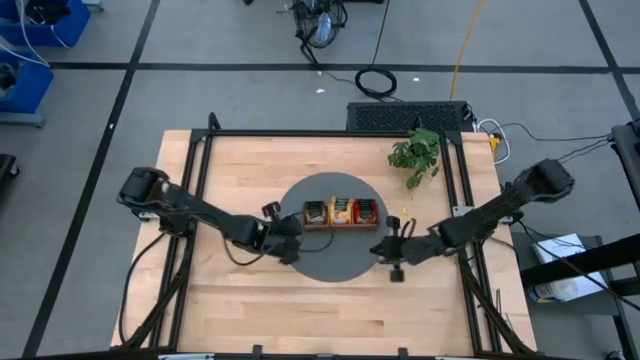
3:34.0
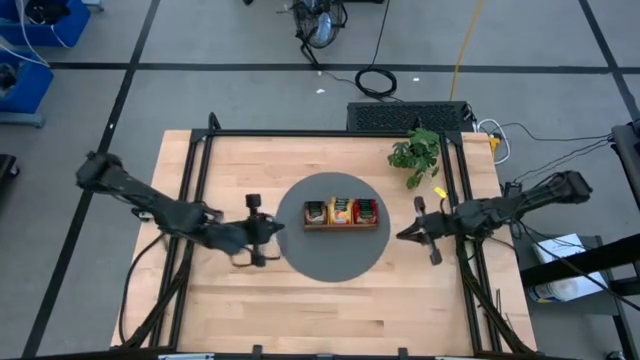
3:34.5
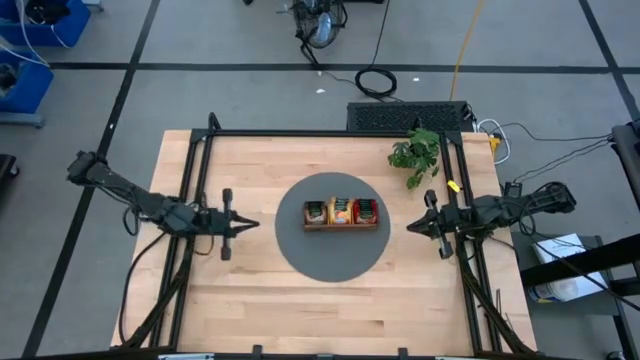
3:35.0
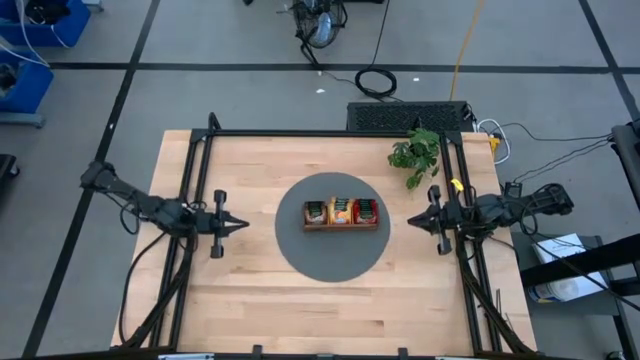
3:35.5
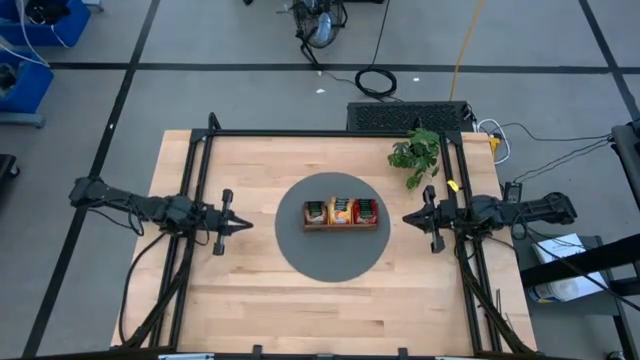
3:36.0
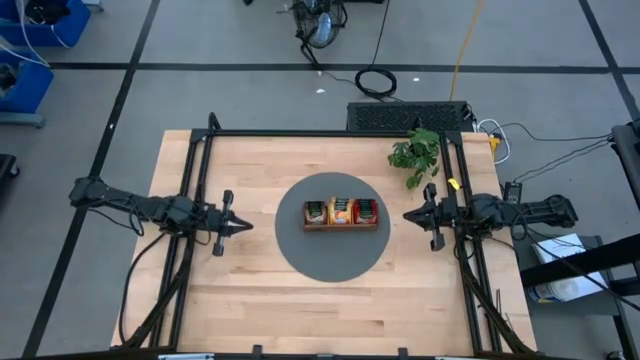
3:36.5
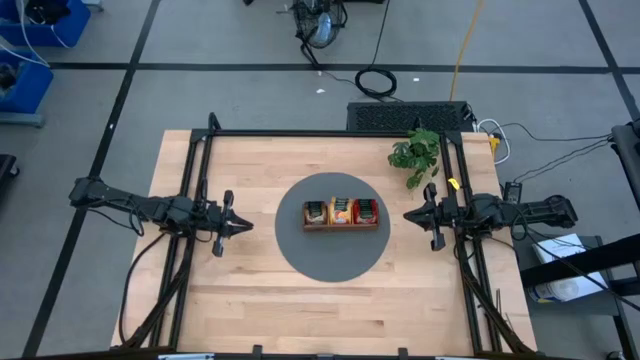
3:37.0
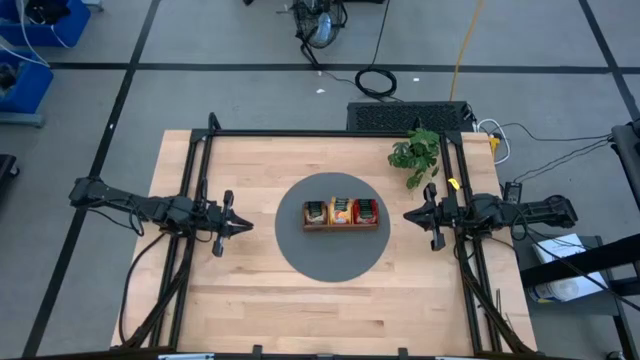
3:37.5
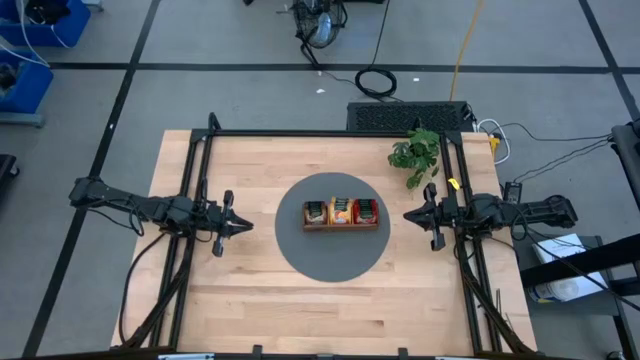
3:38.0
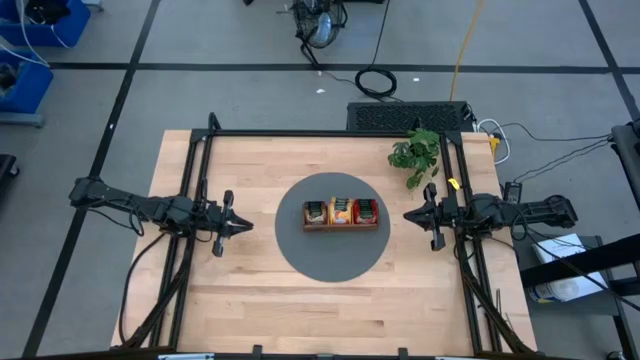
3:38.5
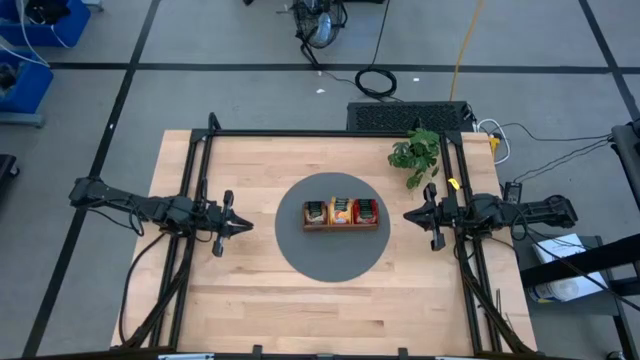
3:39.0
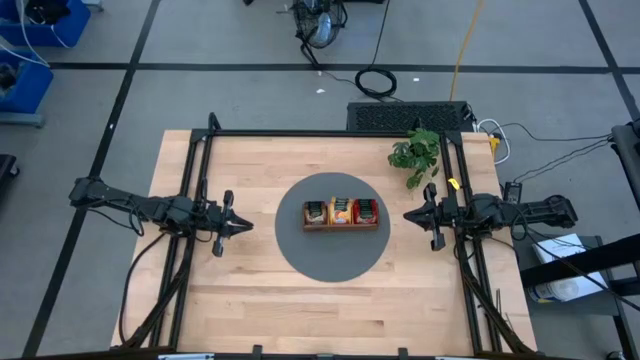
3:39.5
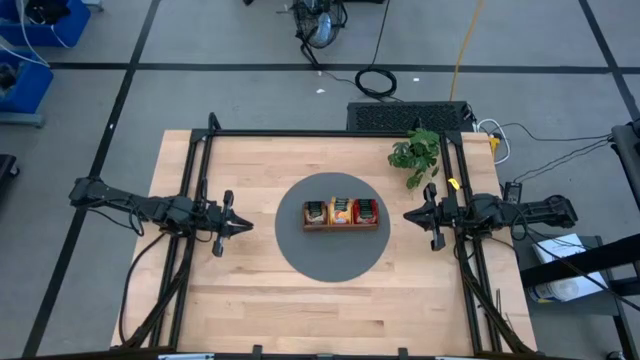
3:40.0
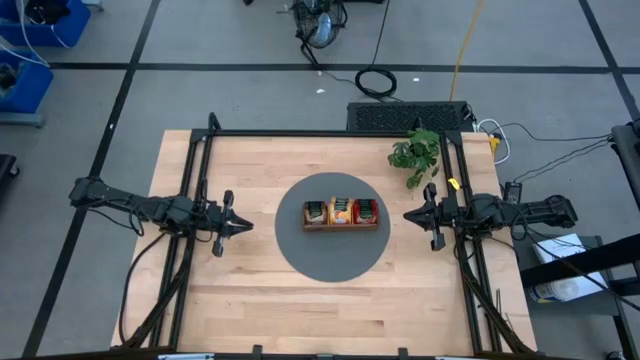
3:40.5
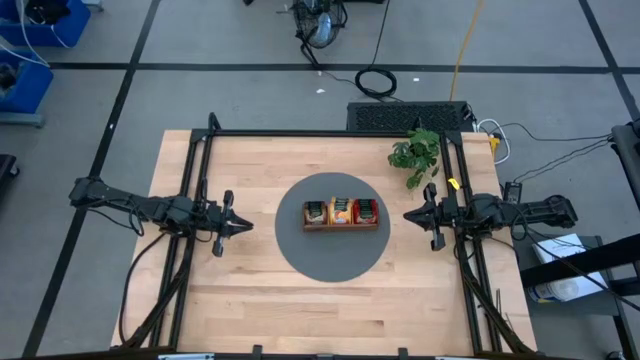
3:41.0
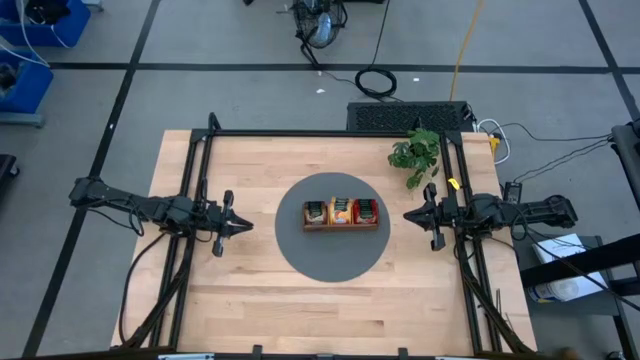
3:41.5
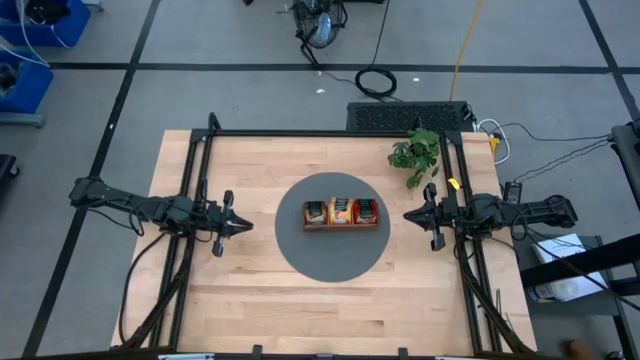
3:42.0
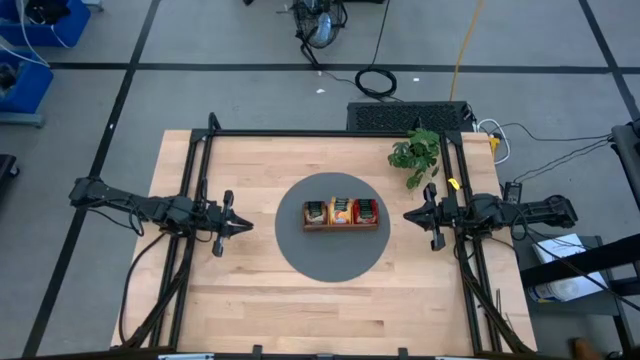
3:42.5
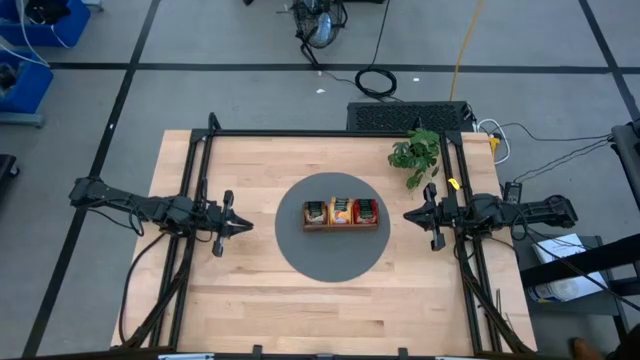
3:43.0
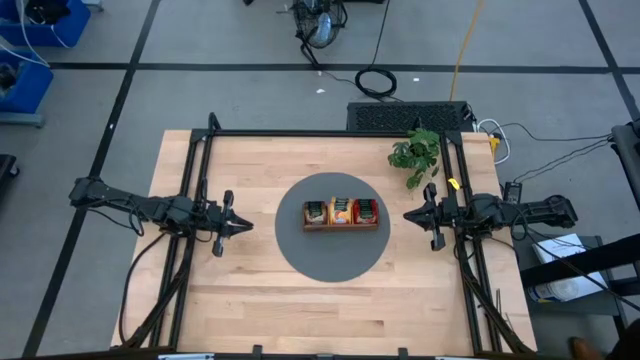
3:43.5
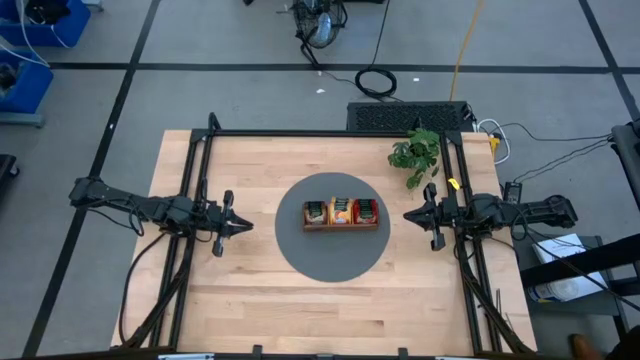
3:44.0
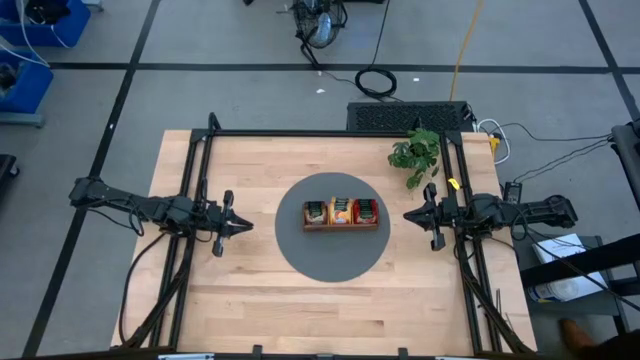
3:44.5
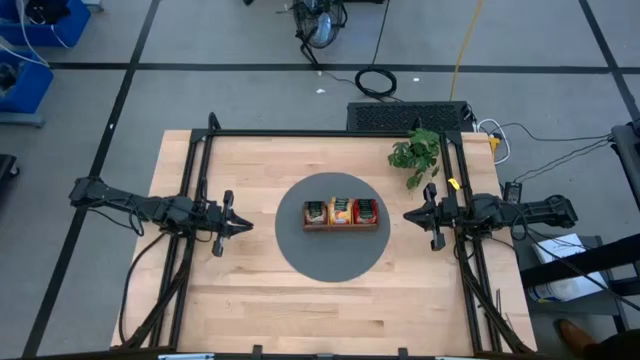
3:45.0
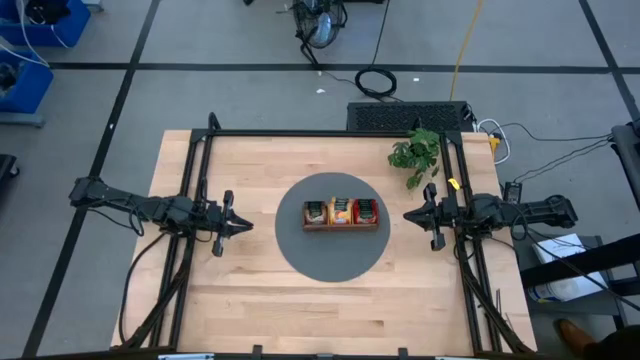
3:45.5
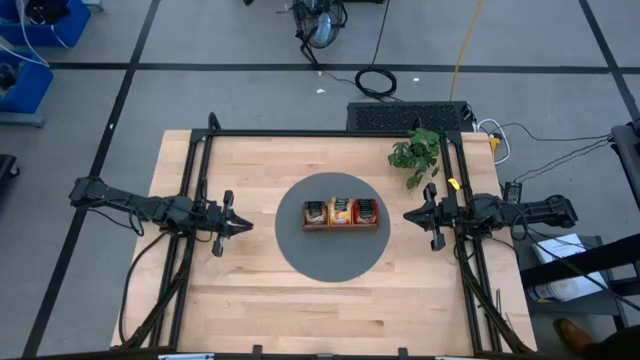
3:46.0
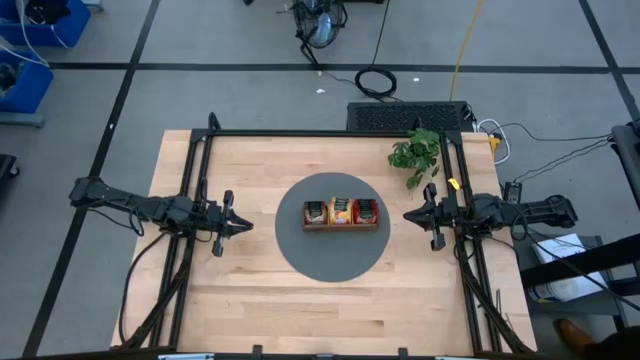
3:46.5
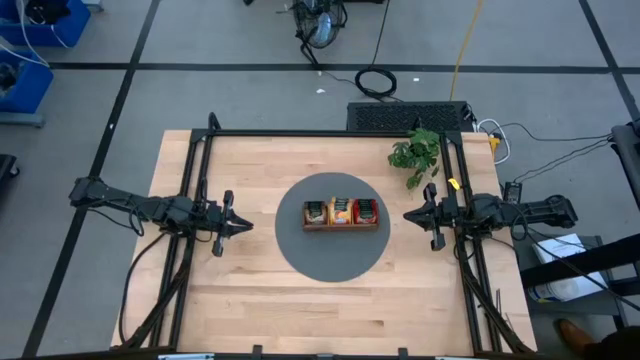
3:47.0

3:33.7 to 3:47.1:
Task: Pick & Place Tea
Return to Home Position

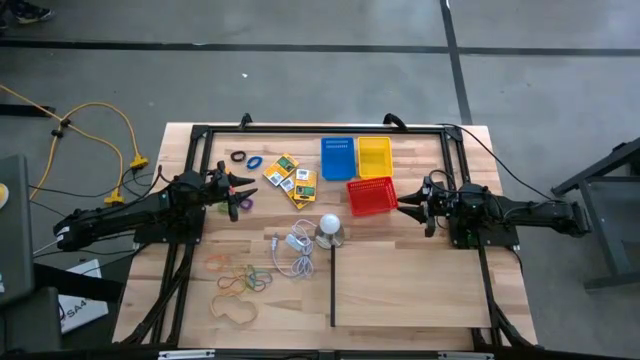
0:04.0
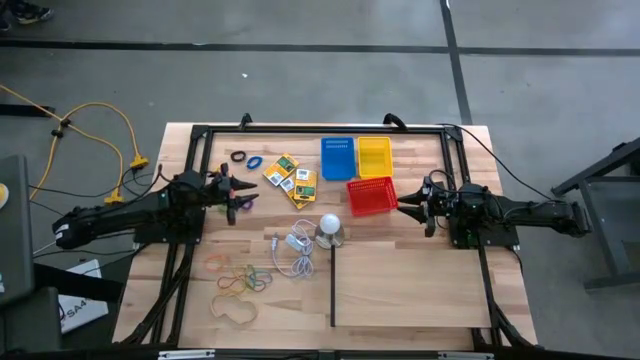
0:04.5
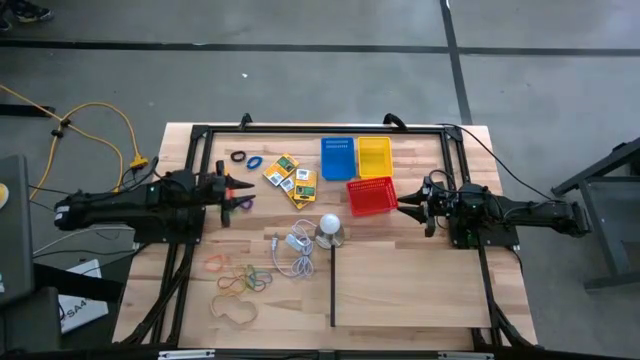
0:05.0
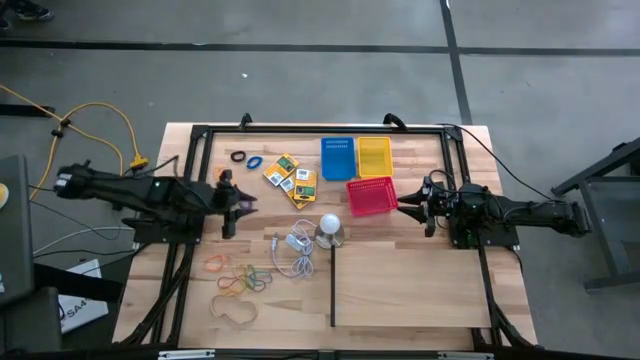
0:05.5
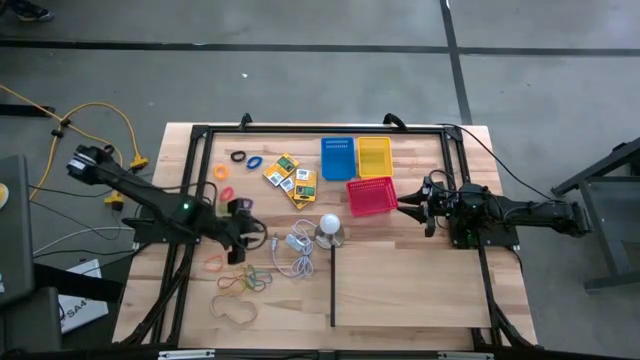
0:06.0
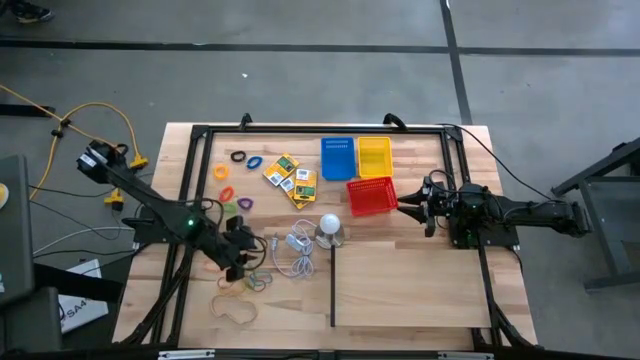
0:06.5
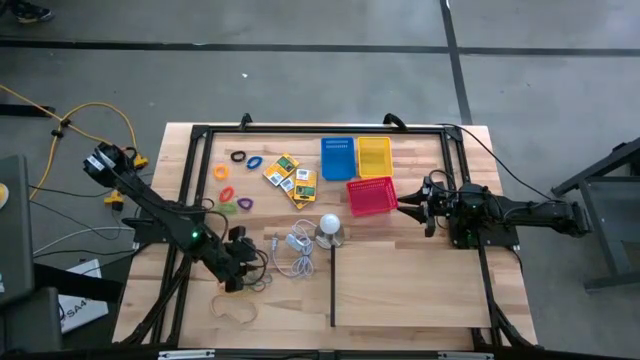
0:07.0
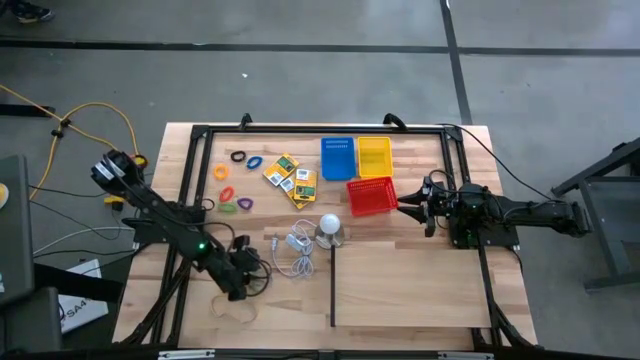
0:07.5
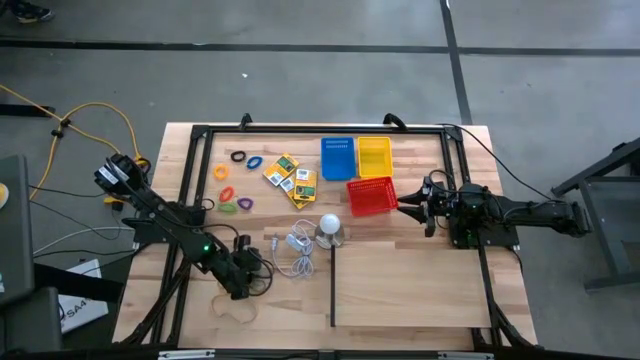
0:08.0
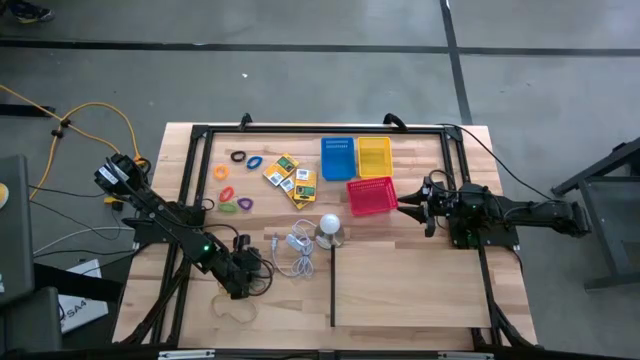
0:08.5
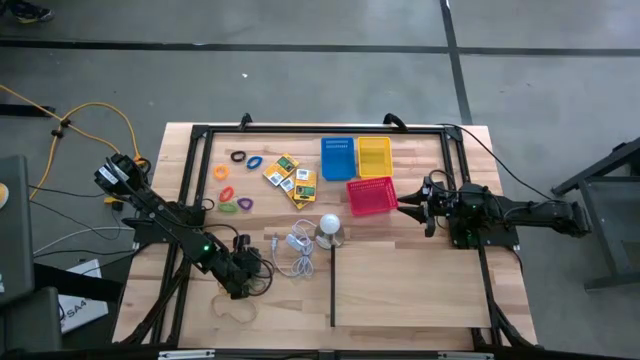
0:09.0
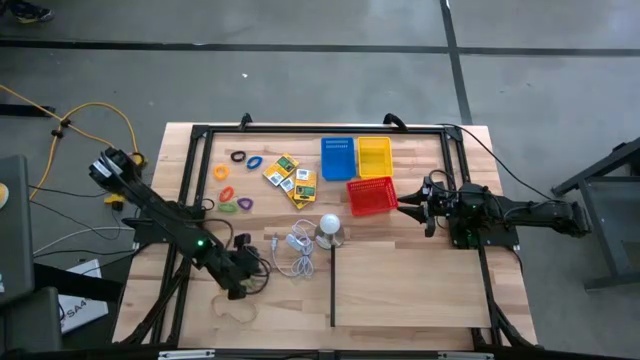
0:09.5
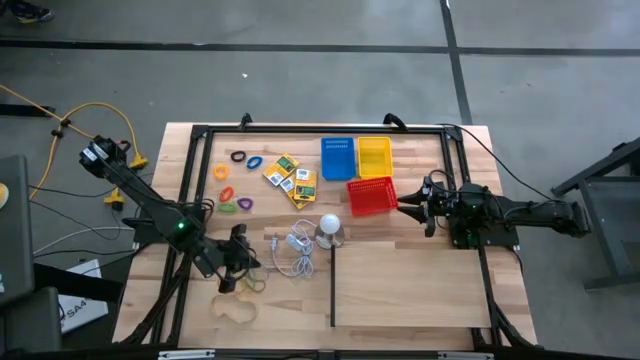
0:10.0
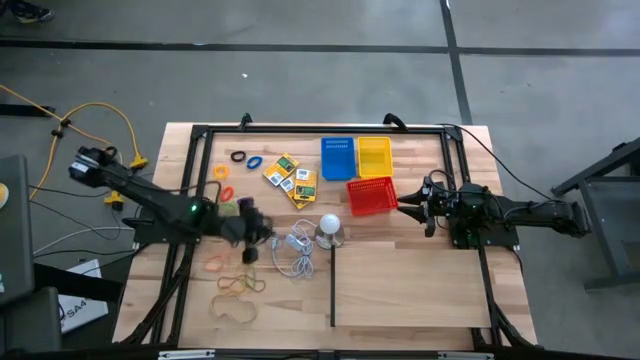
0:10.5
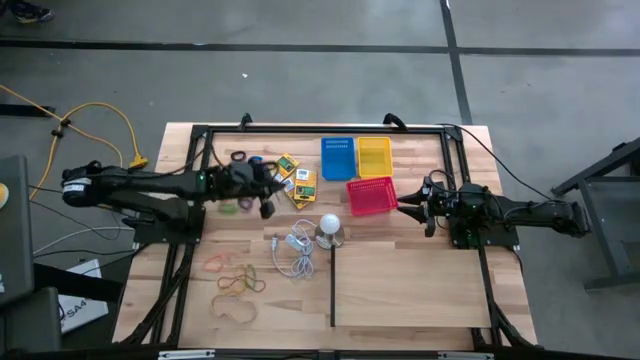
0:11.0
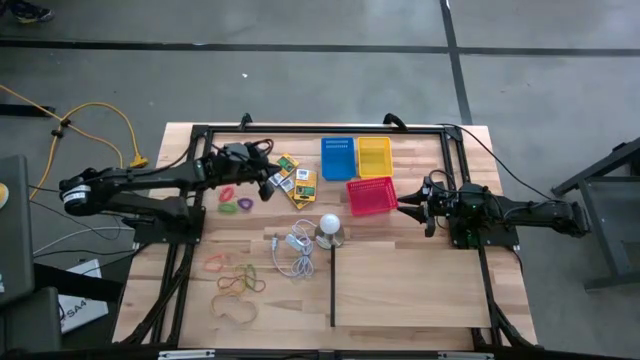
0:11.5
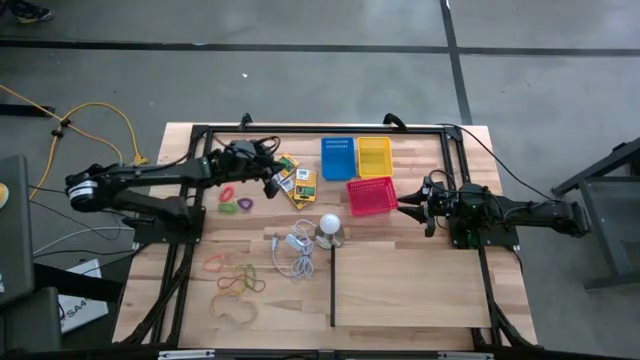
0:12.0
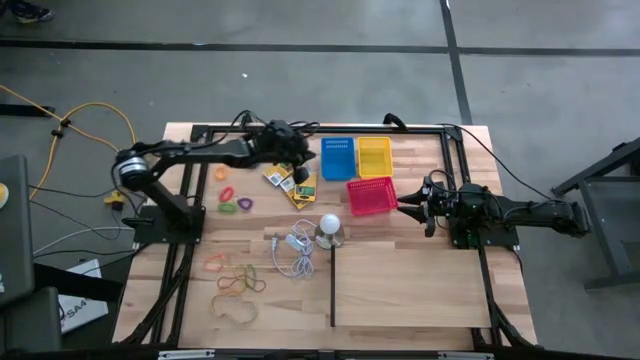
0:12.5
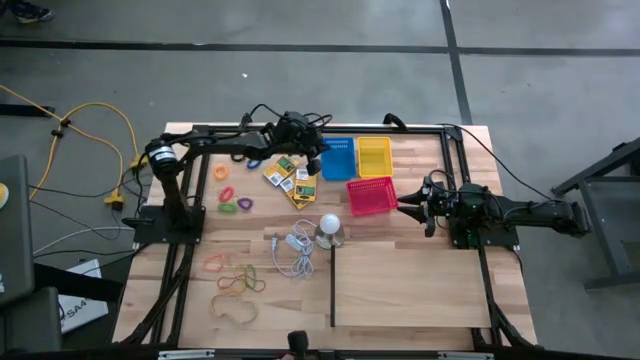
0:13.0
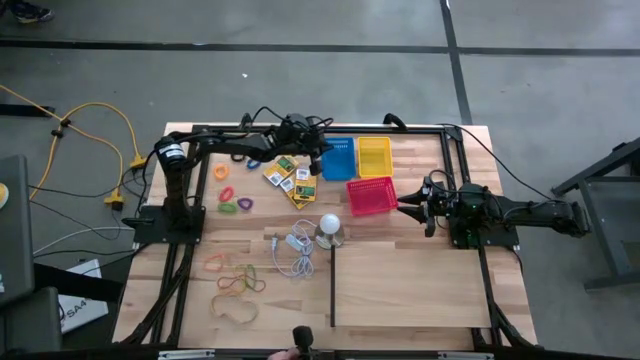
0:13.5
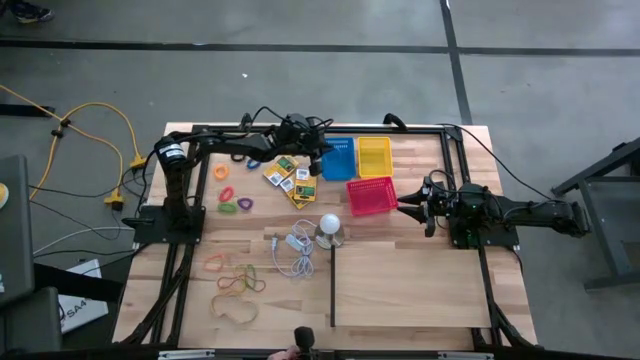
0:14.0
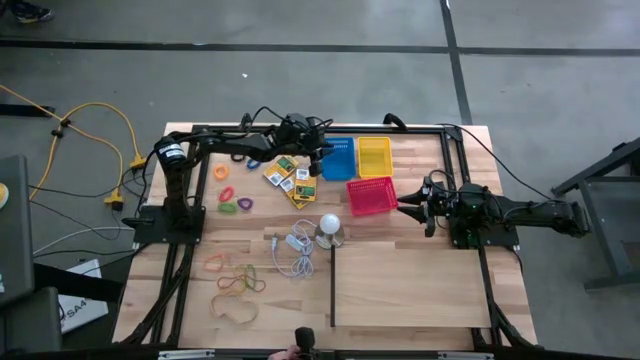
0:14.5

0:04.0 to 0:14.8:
Task: Pick & Place Office Desk Supplies
Put the blue rubber band into the blue bin
